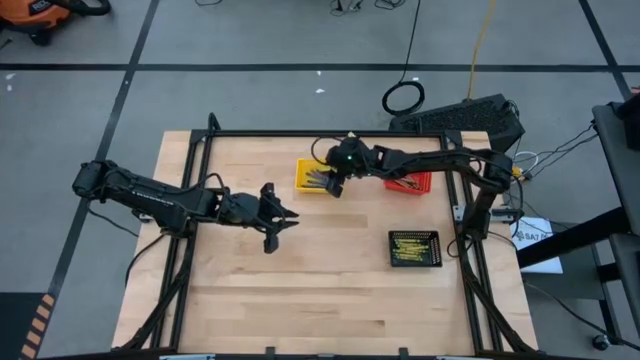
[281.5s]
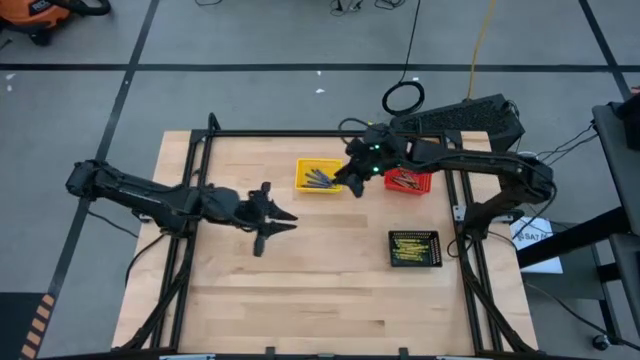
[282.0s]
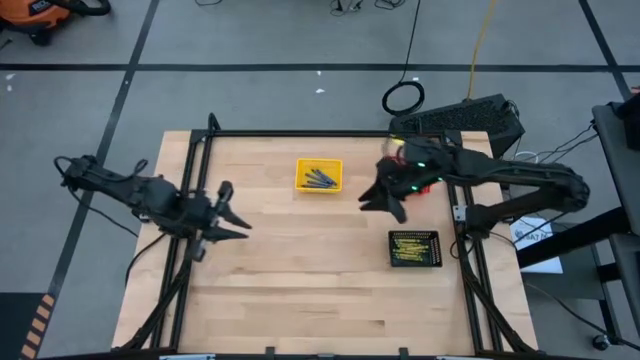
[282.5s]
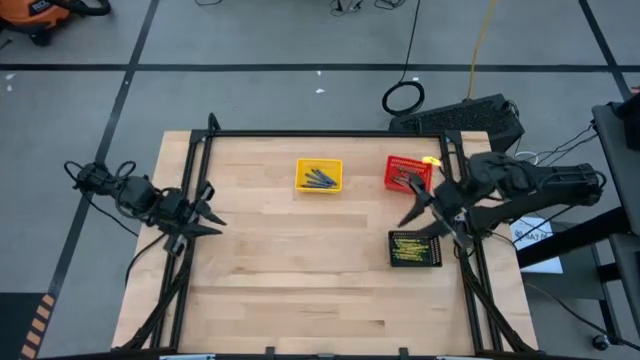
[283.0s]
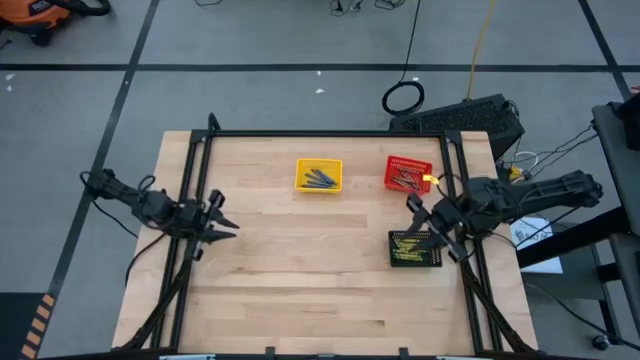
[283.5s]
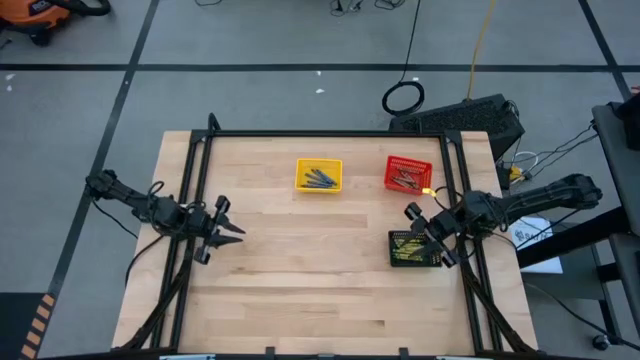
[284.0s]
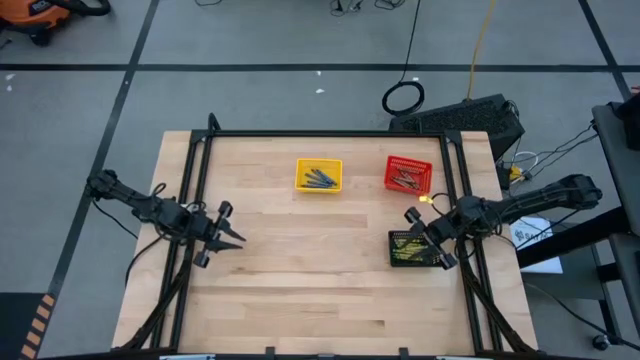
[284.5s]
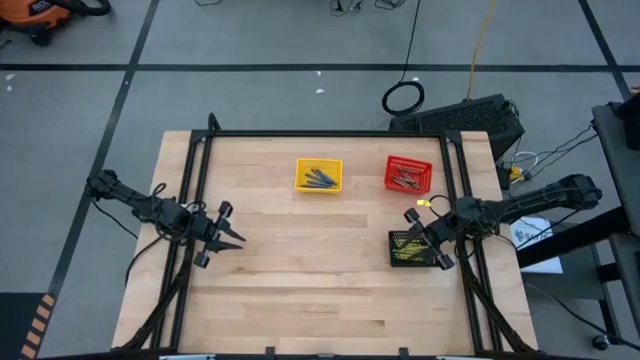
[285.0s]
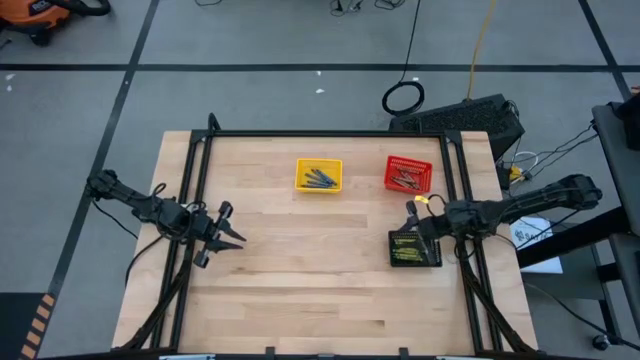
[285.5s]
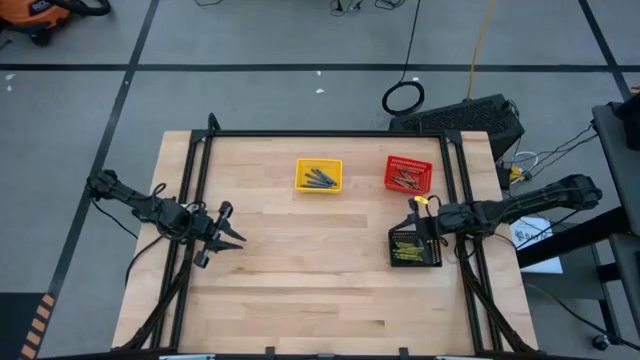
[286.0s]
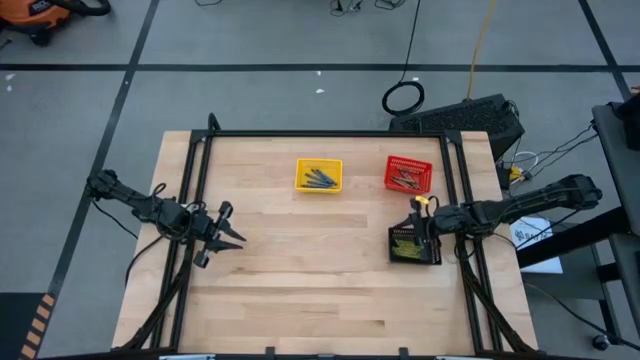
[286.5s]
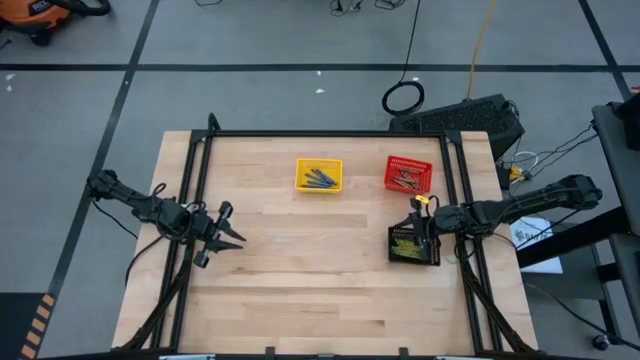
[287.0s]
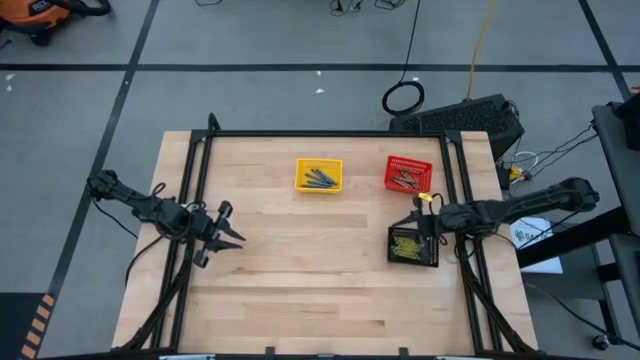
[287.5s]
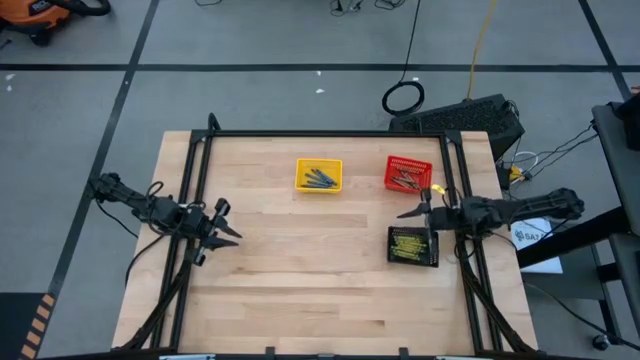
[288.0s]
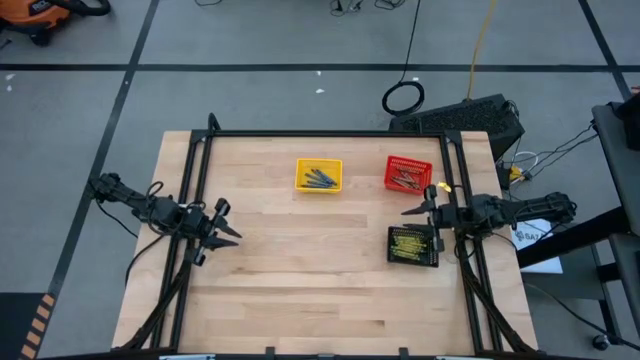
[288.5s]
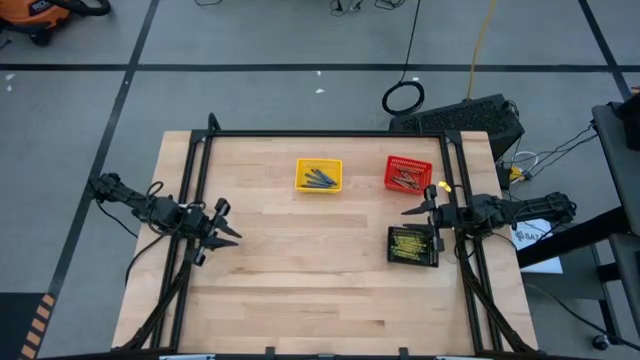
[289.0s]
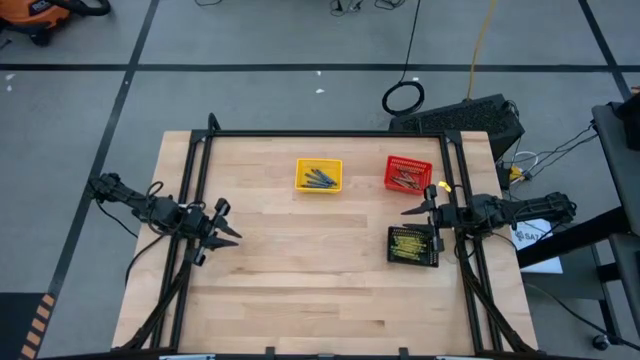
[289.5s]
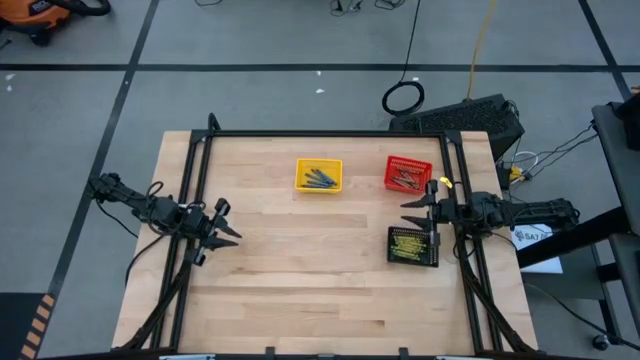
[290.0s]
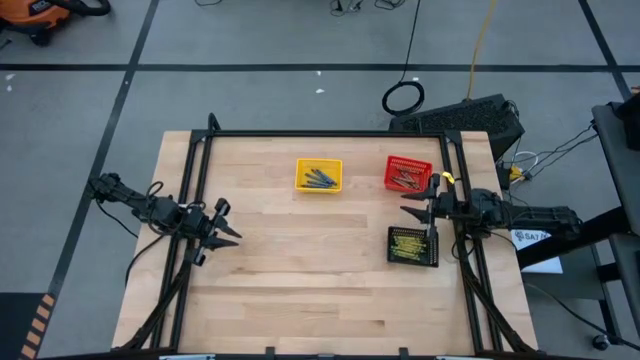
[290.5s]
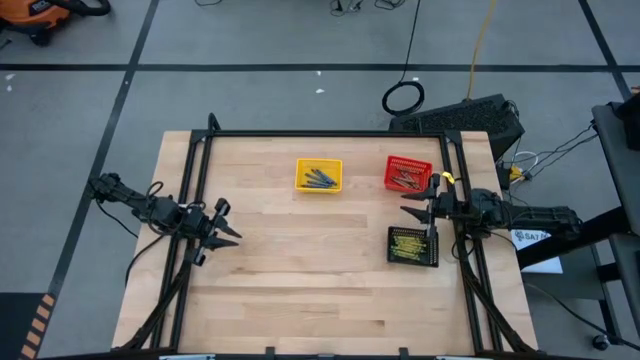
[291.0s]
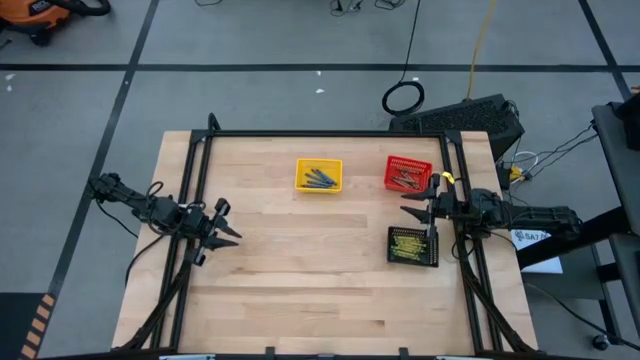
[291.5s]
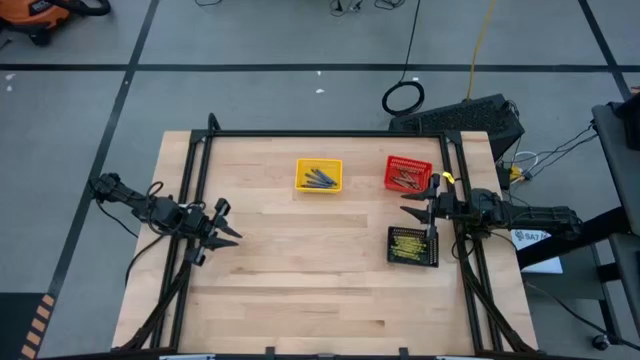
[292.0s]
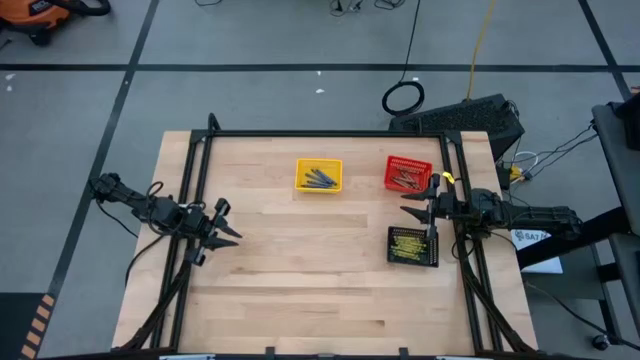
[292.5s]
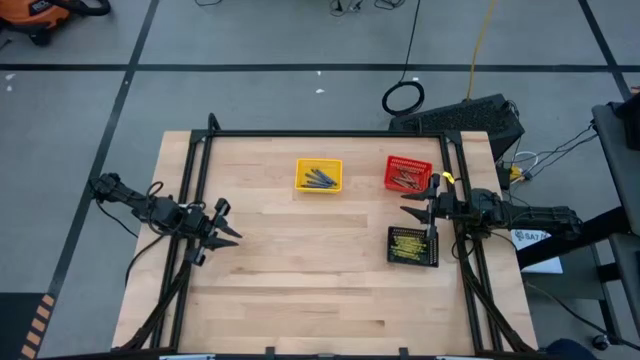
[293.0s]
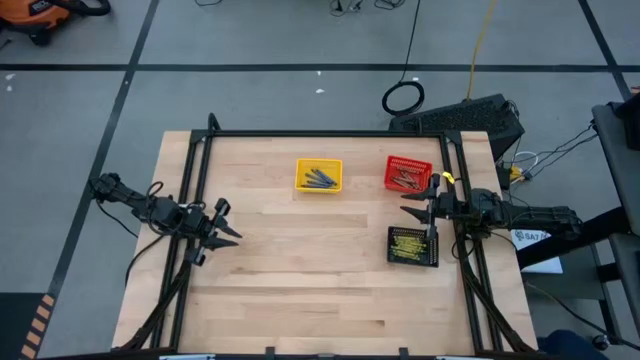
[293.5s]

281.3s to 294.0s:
Task: Sort crayons
Return to Home Position

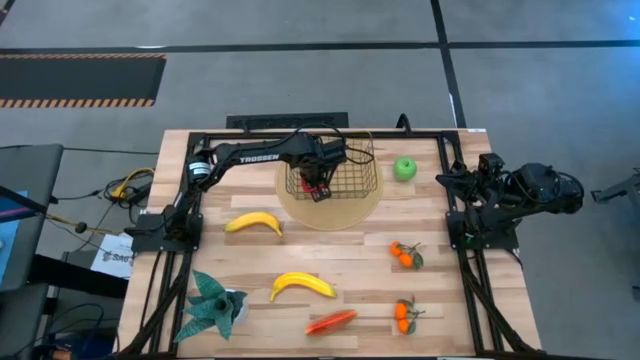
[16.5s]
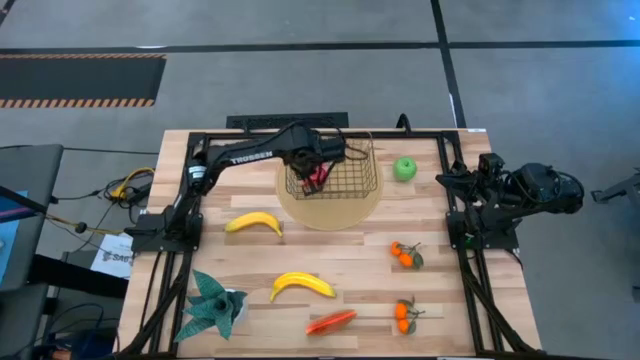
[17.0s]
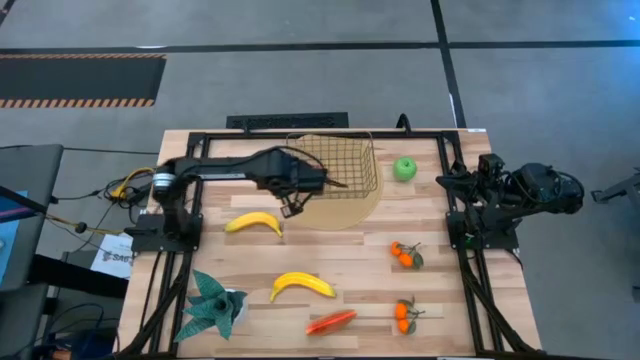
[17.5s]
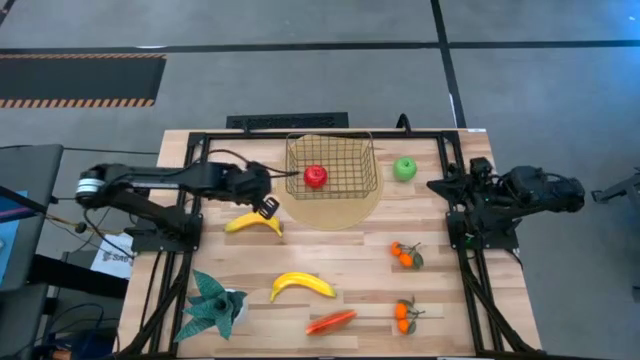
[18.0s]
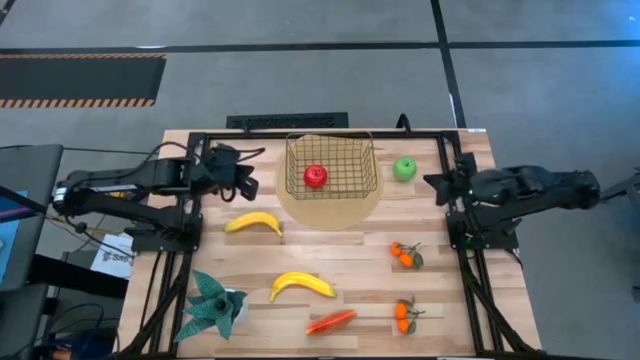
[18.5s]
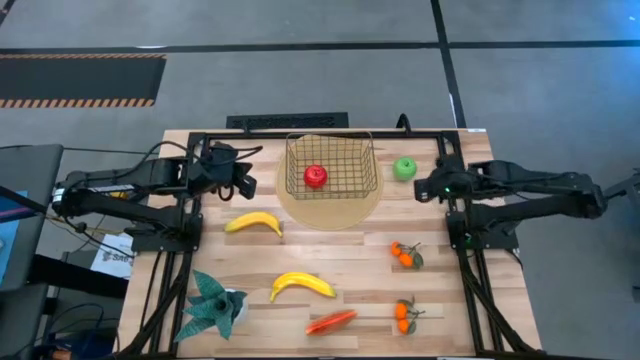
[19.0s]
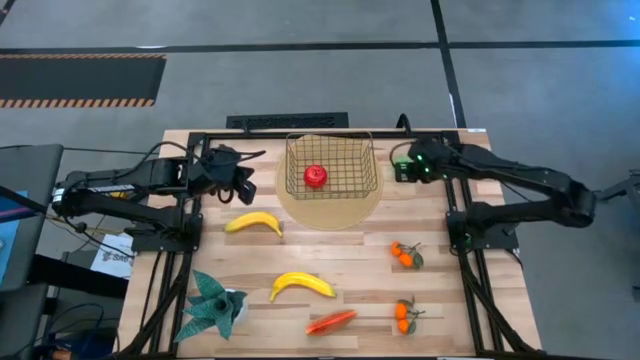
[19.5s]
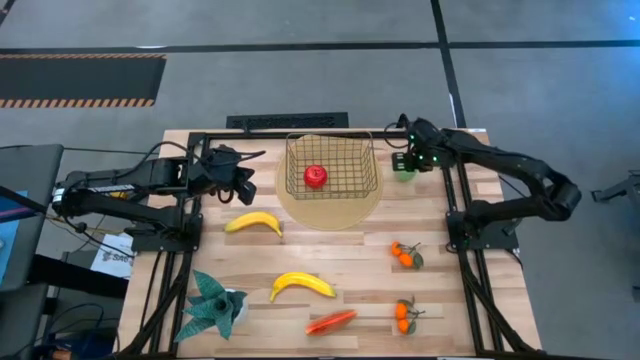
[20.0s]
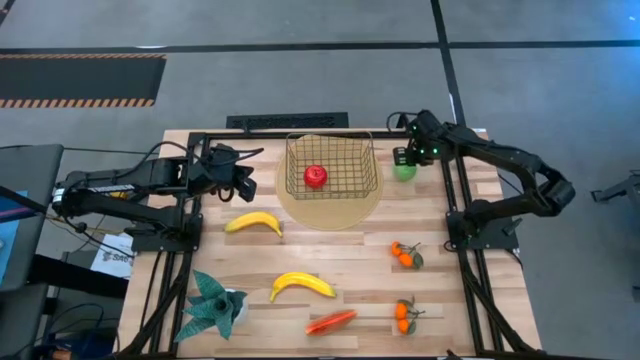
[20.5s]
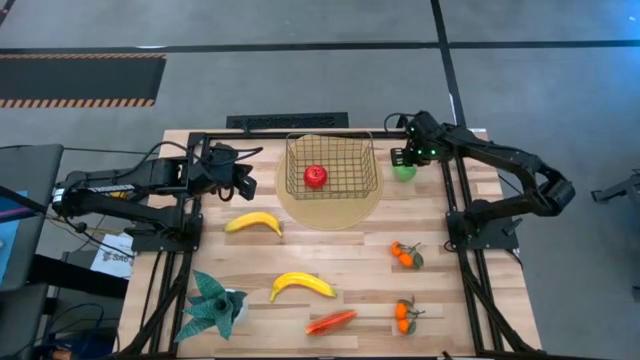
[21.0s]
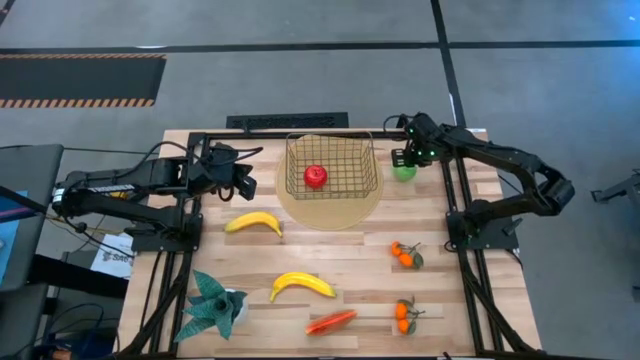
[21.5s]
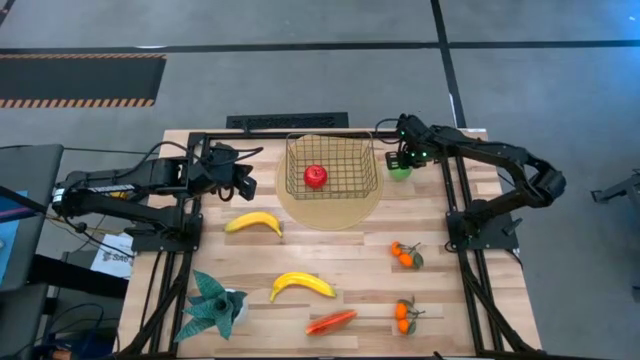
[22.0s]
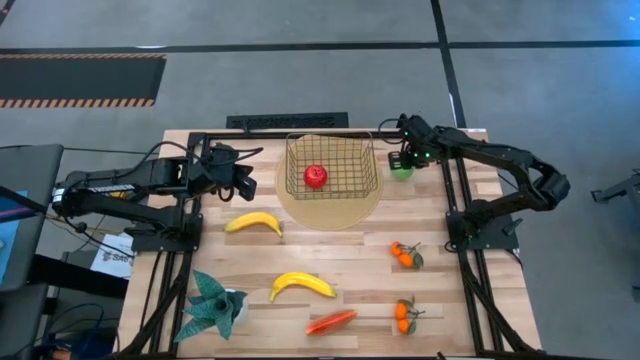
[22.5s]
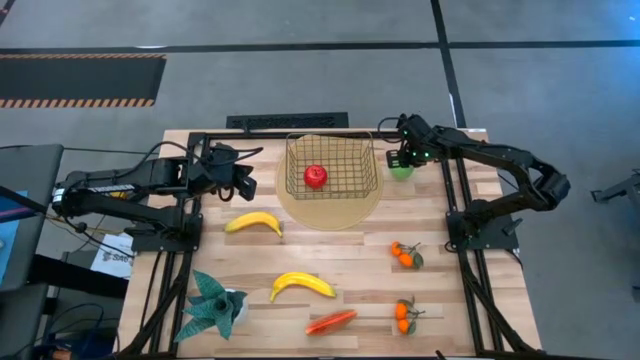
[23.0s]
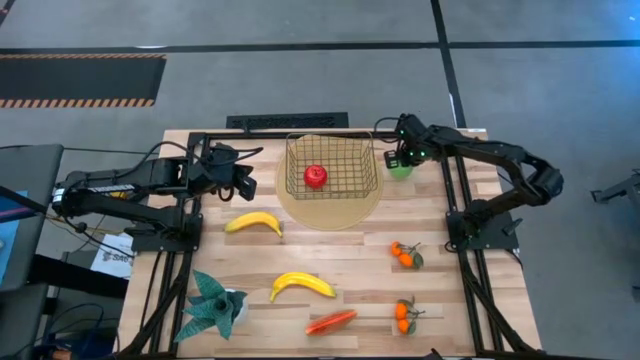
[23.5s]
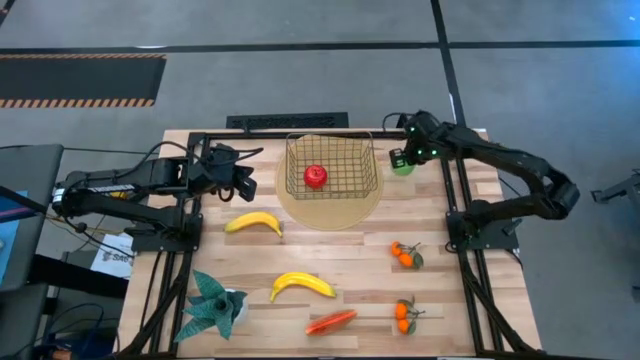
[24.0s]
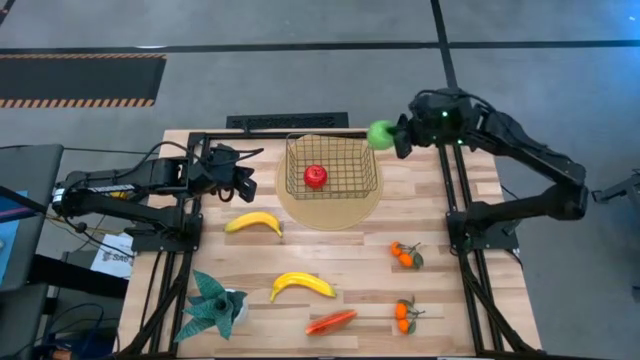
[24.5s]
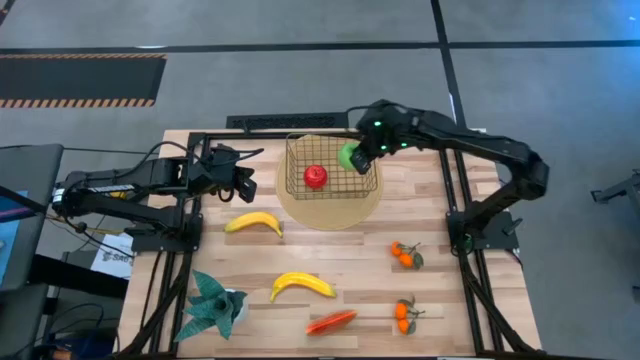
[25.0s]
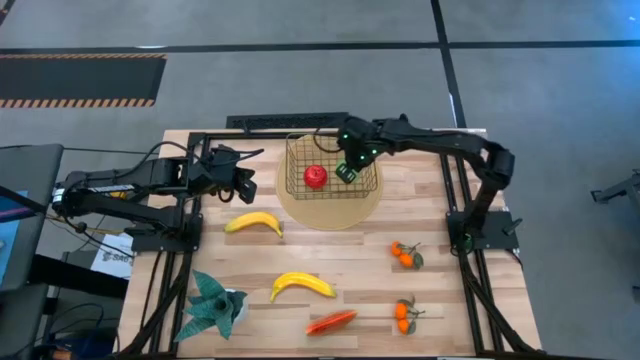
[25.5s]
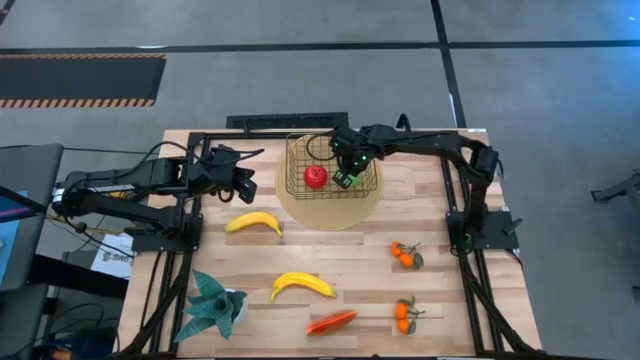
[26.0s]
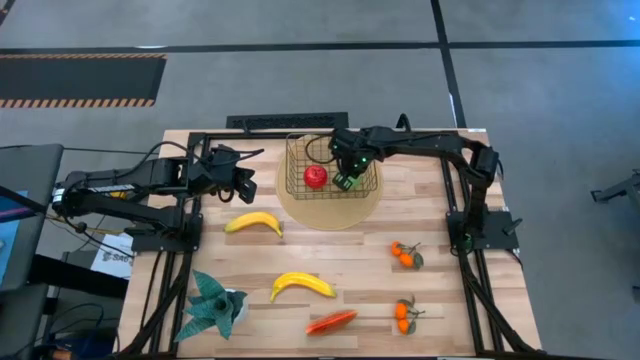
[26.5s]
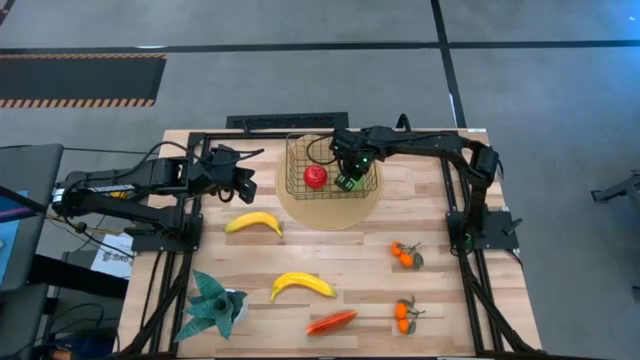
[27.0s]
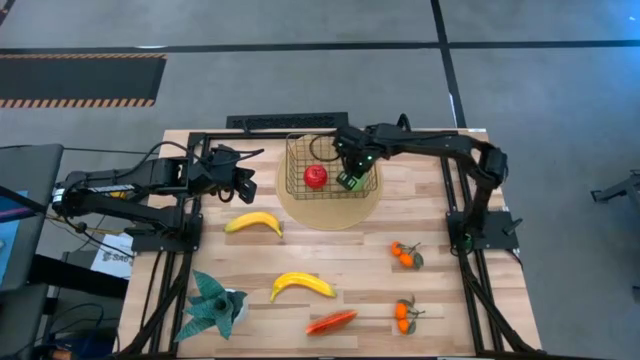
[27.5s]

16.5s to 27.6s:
Task: Build produce basket
Put the green apple into the basket
